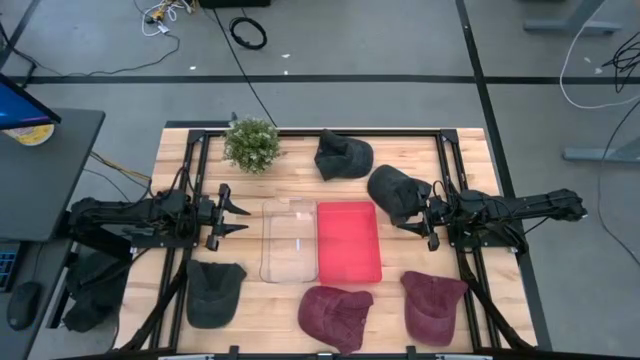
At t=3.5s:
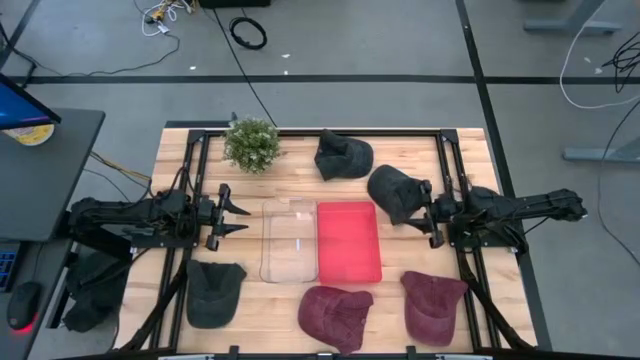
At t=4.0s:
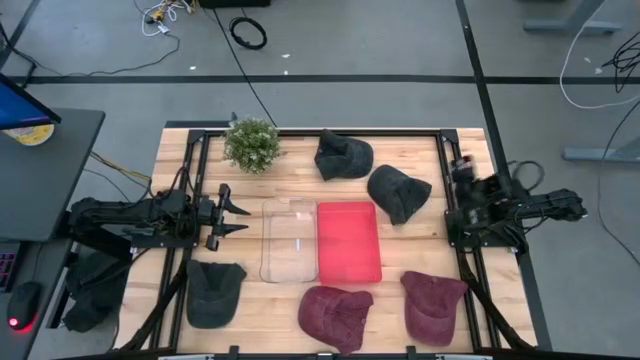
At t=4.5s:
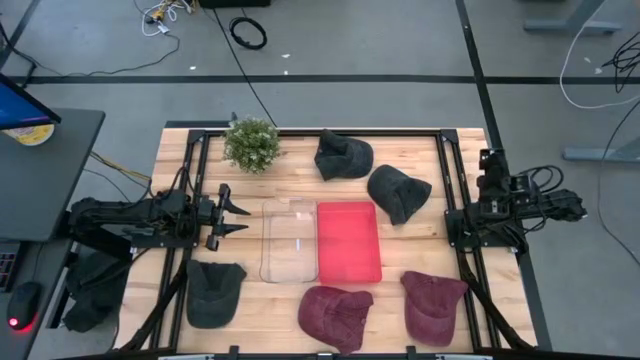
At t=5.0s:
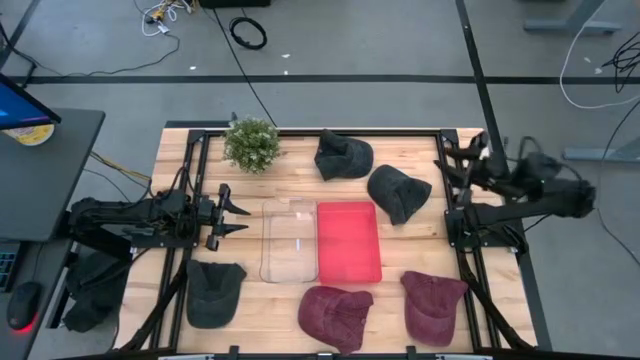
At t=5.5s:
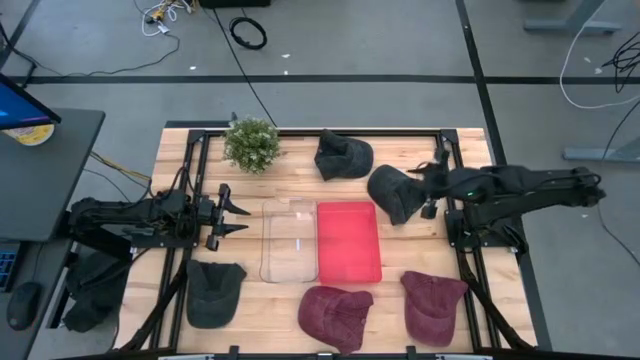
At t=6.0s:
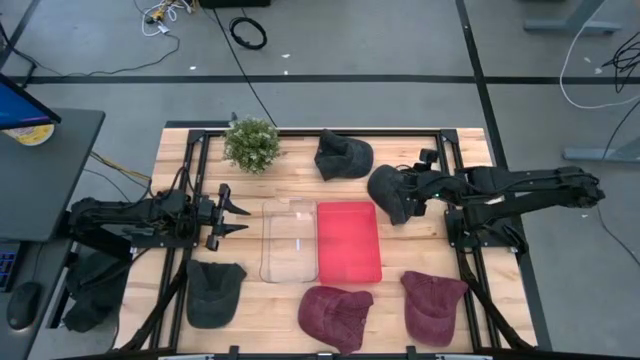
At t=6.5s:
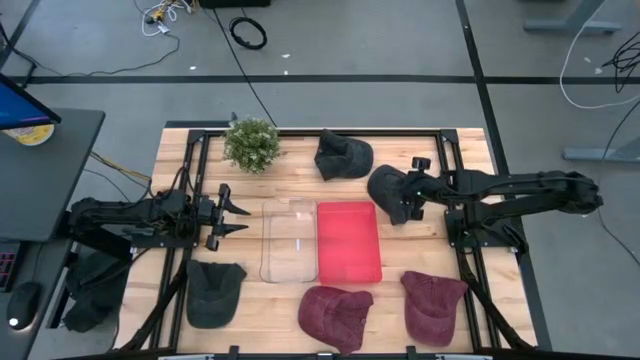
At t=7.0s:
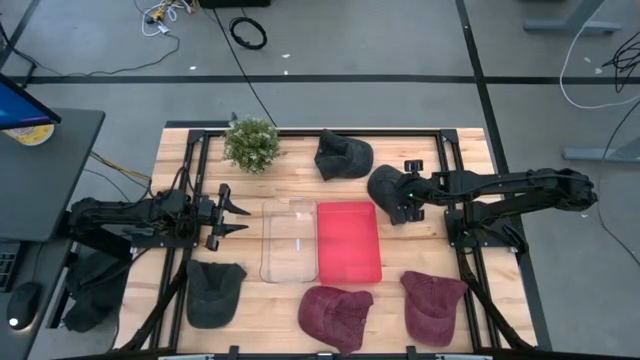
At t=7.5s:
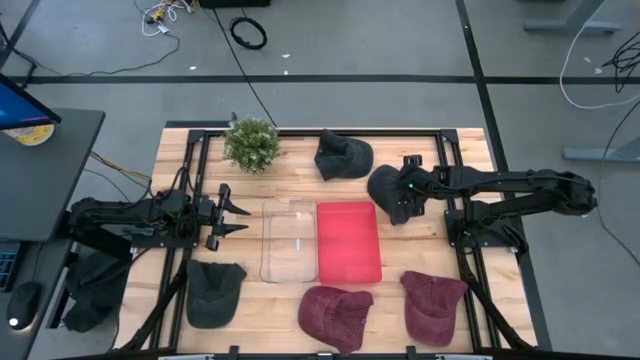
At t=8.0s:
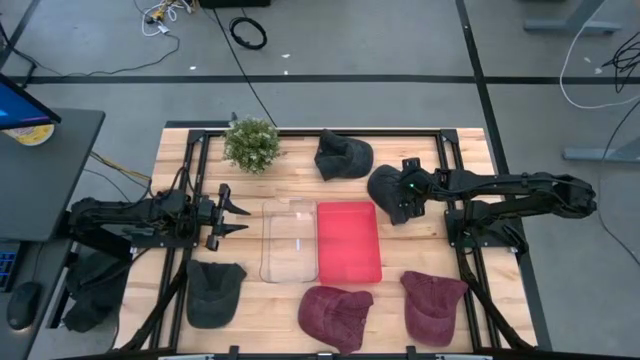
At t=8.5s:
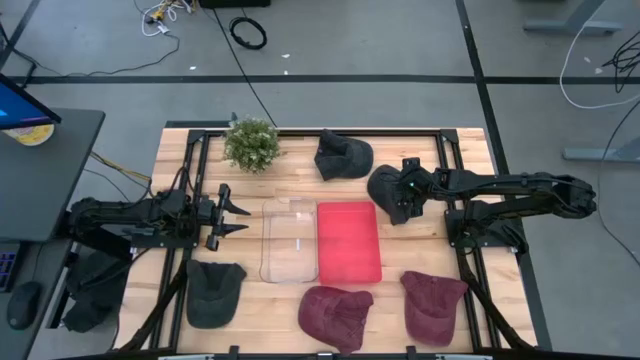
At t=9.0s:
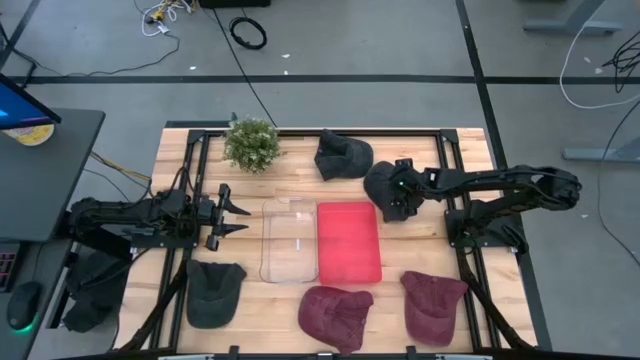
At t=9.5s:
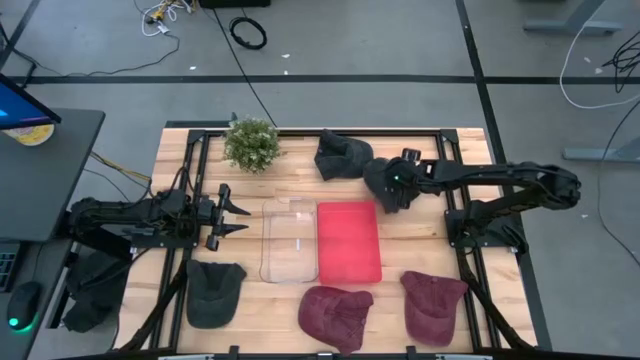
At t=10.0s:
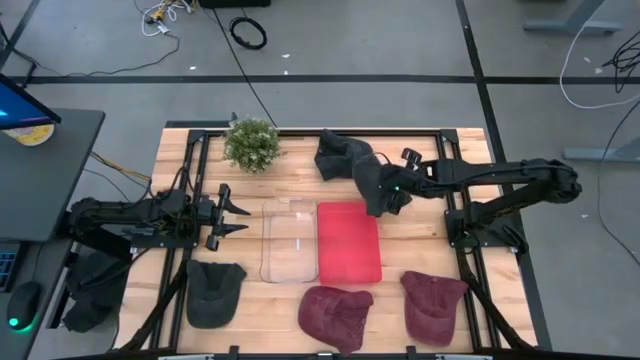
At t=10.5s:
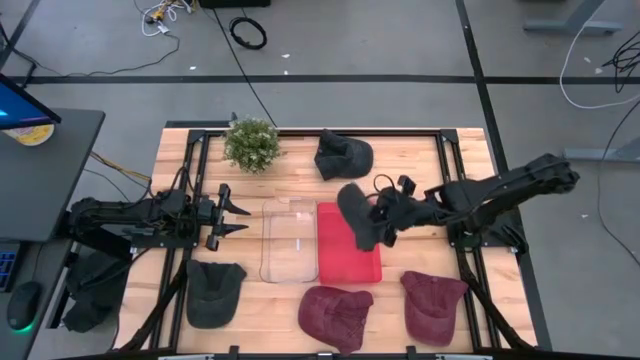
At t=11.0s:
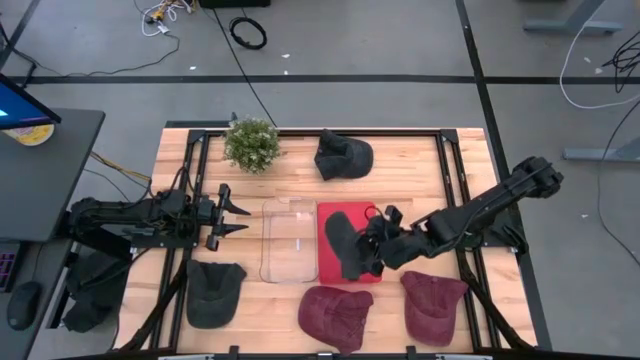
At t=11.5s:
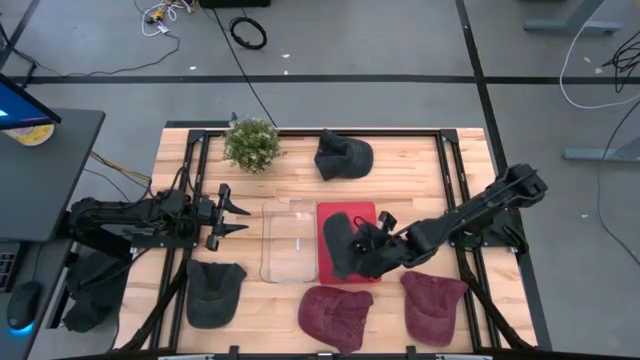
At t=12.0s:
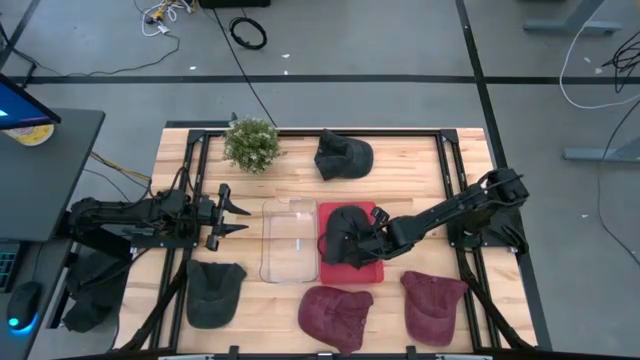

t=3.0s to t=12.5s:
Task: Pick & Place hat
Put the top right black cap into the red bin

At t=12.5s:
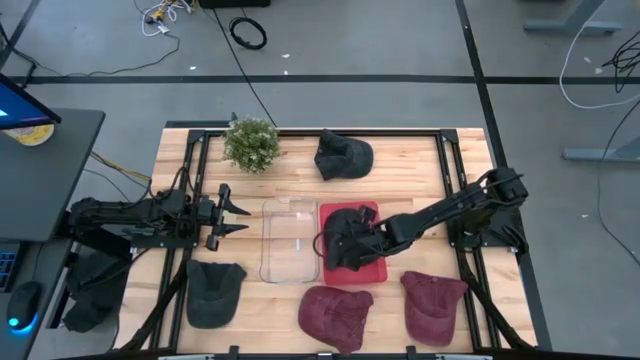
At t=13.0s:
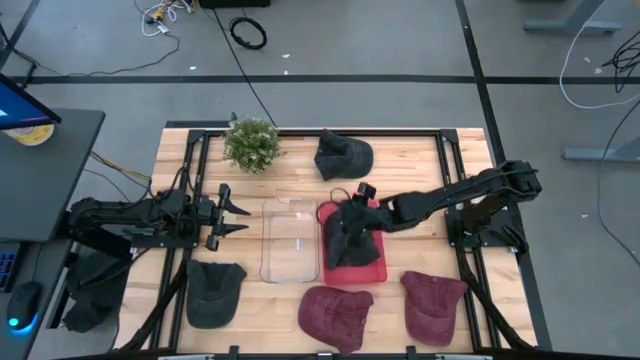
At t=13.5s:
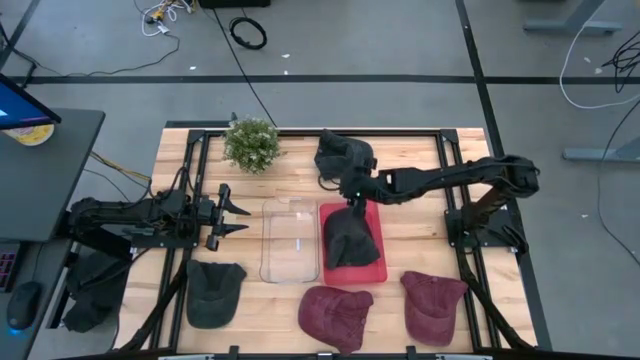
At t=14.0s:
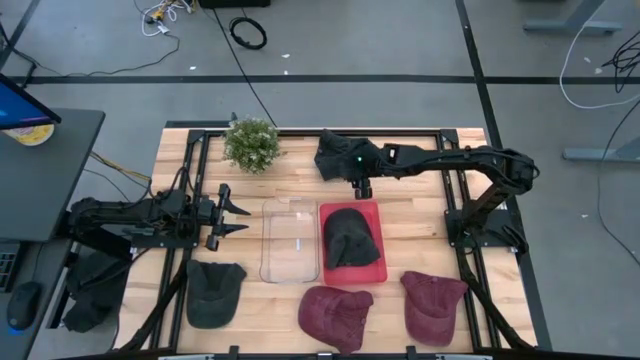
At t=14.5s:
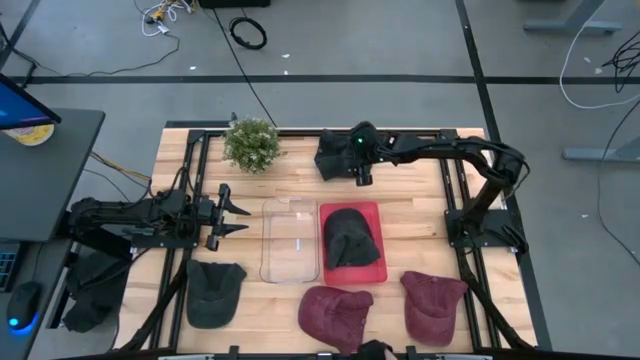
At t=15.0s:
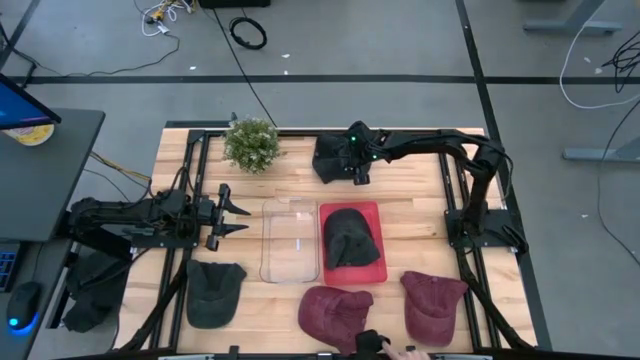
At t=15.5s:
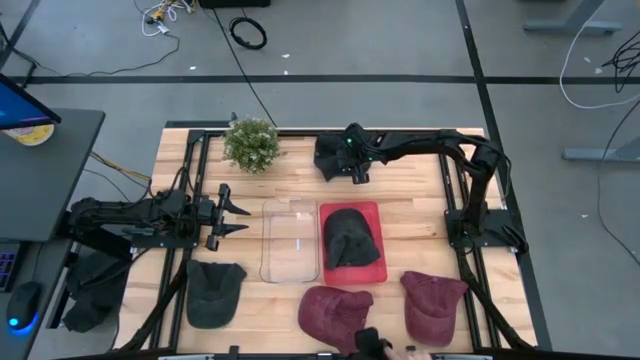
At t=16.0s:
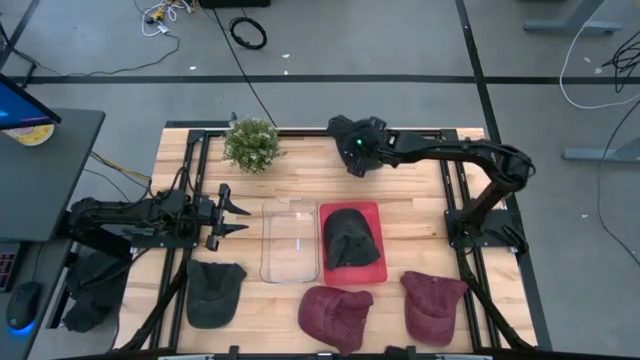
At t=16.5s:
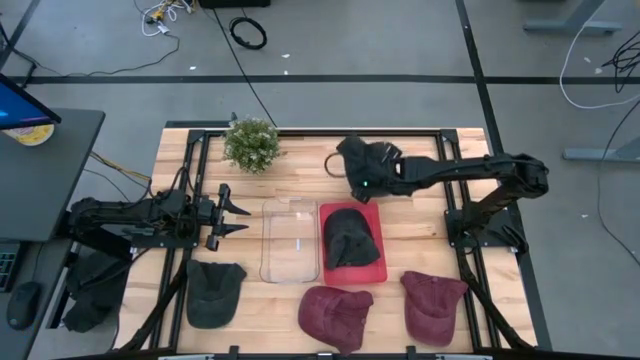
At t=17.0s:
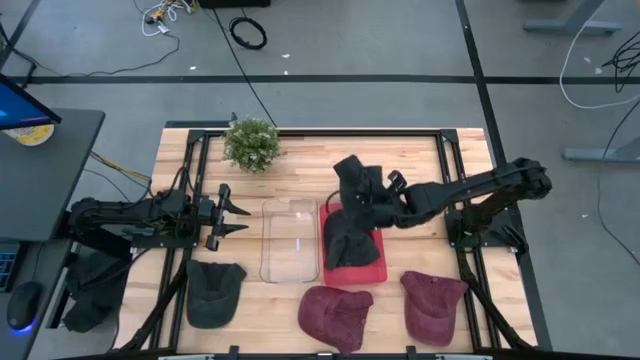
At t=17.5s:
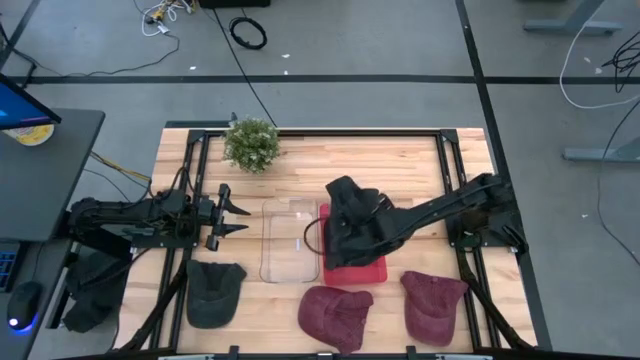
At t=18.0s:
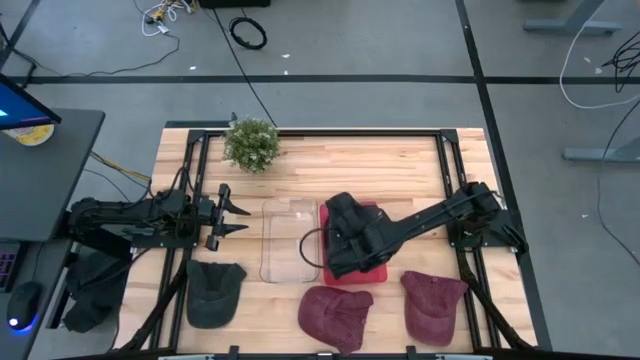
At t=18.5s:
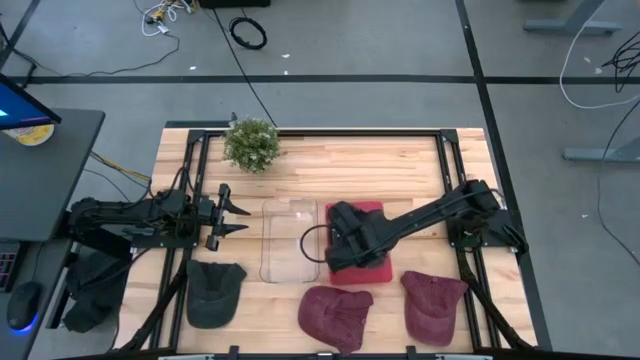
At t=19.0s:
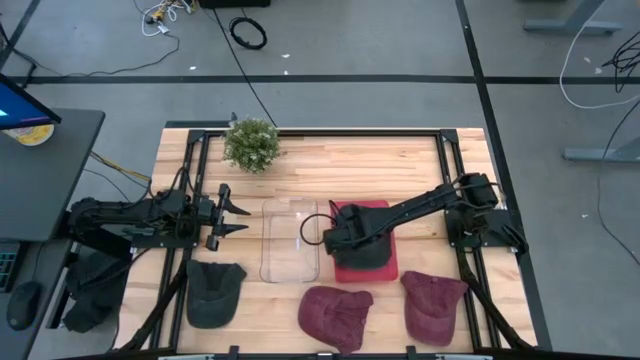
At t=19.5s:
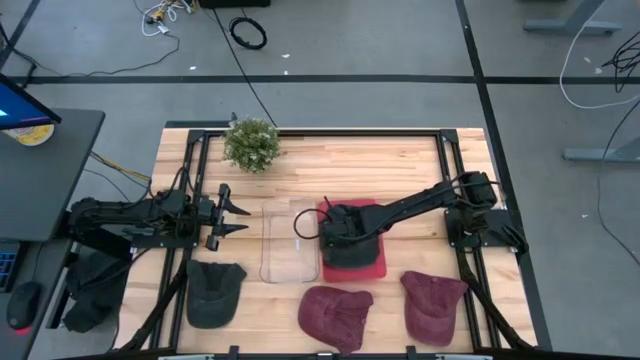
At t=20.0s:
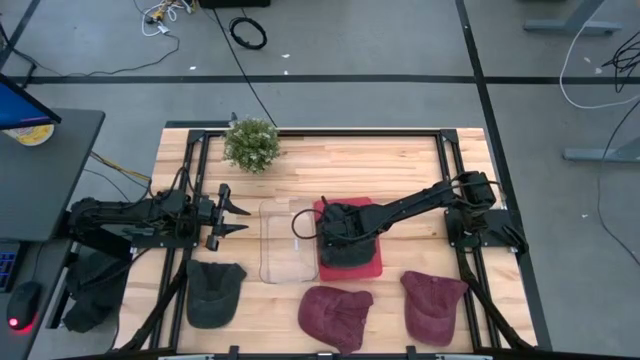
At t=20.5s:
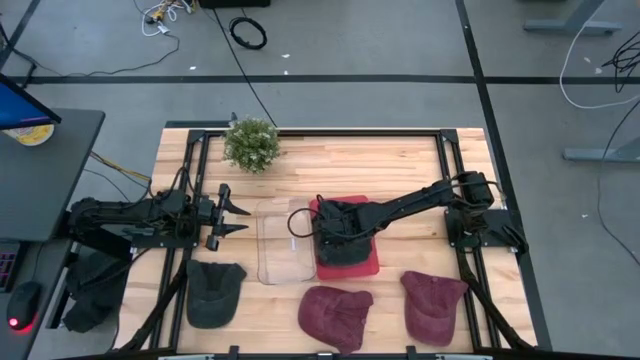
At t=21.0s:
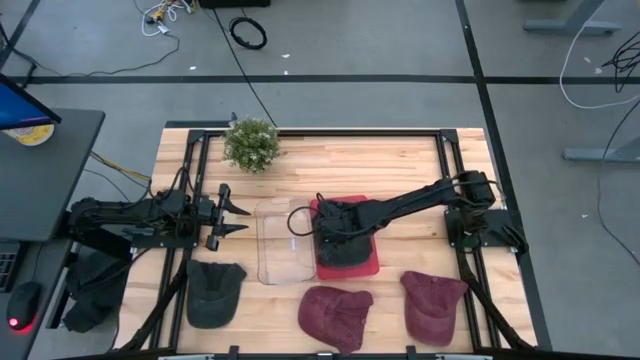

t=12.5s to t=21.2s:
Put the top black cap into the red bin

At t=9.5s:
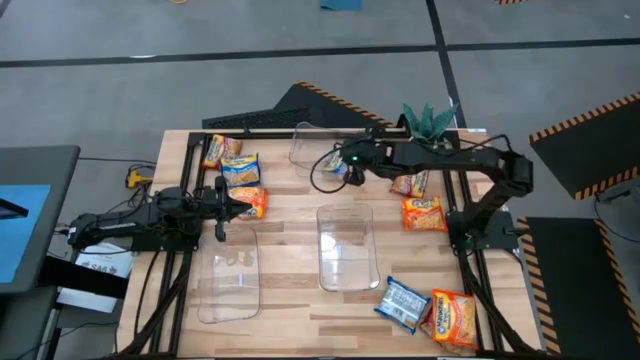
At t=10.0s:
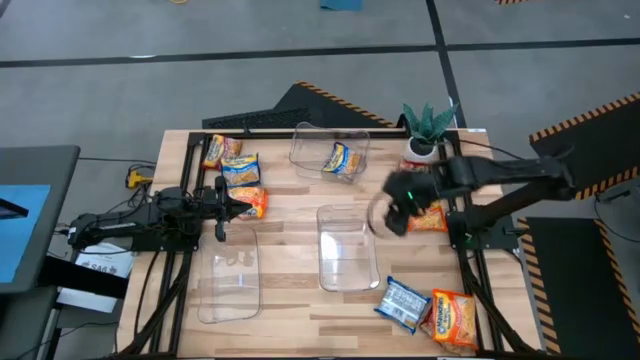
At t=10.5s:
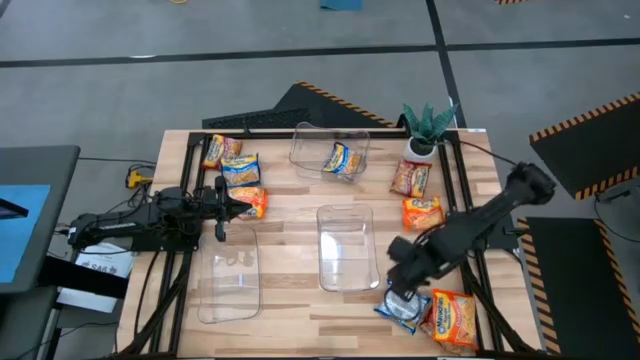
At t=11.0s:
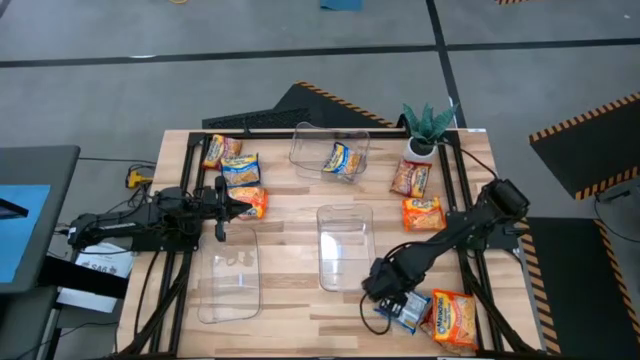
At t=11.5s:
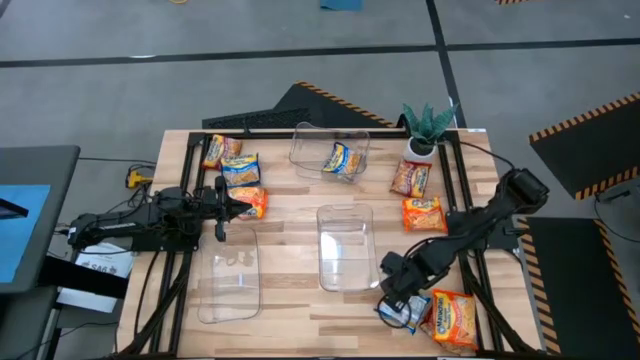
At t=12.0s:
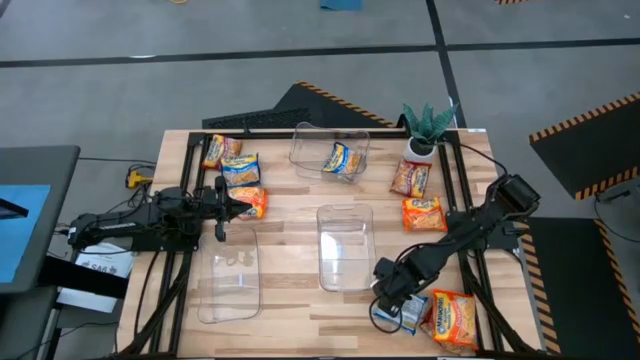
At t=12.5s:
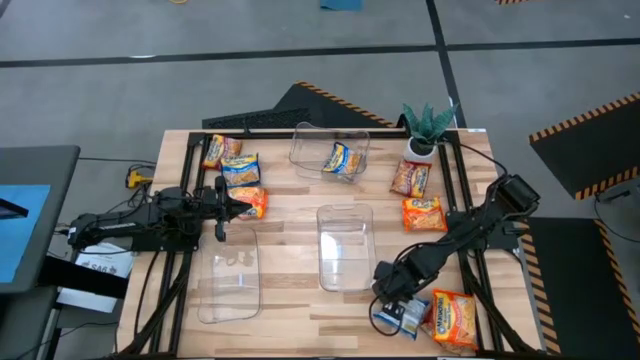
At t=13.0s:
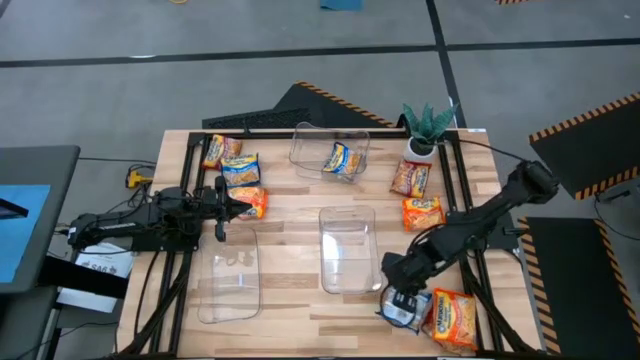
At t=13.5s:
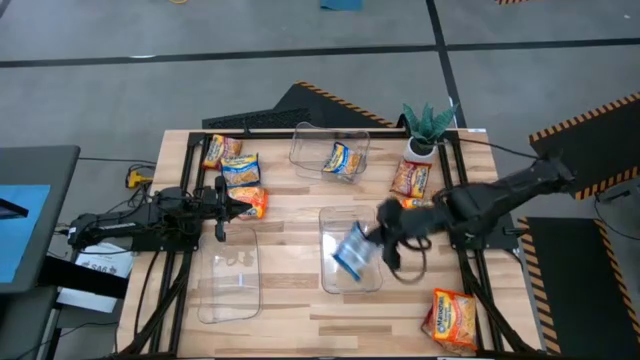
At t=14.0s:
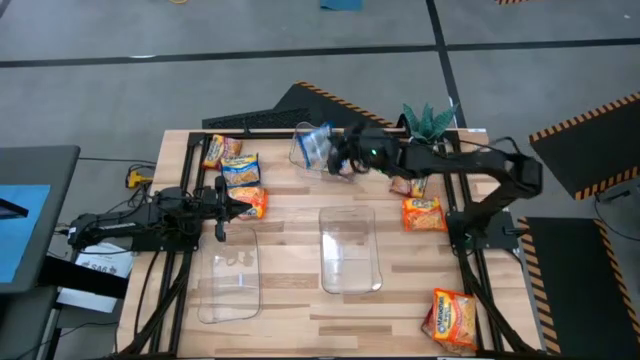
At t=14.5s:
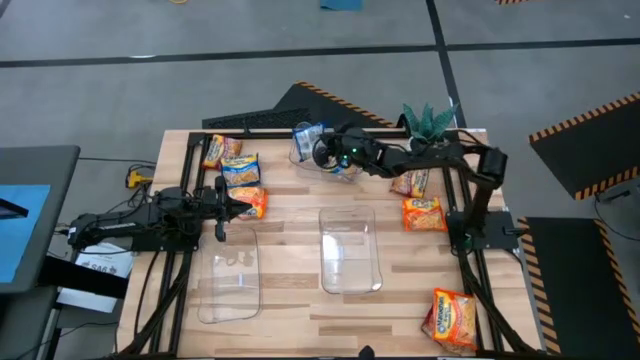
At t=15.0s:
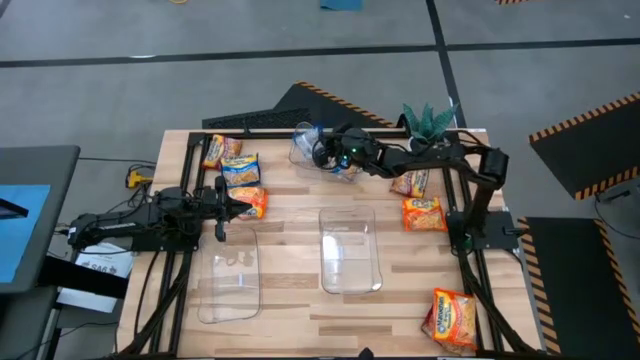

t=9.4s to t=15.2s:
Task: Sort Maruchan noodles
Put the bottom blue noodle pack into the top transparent bin
